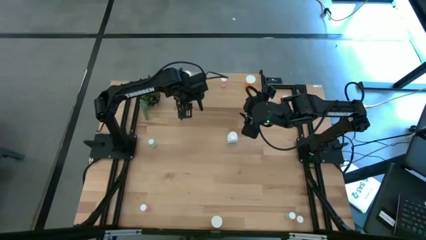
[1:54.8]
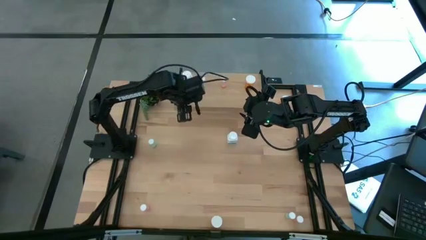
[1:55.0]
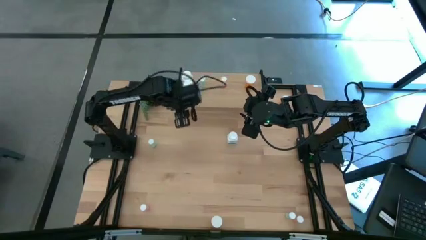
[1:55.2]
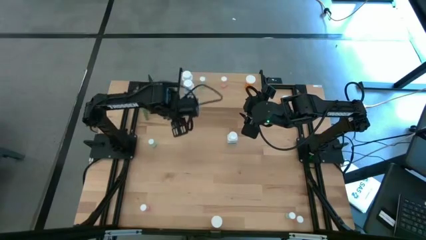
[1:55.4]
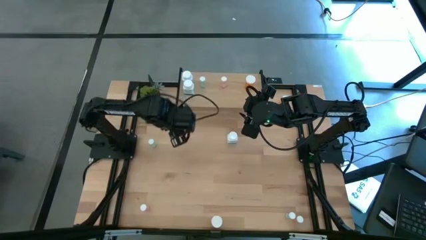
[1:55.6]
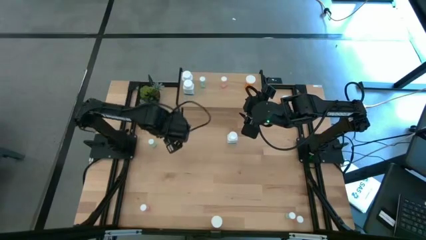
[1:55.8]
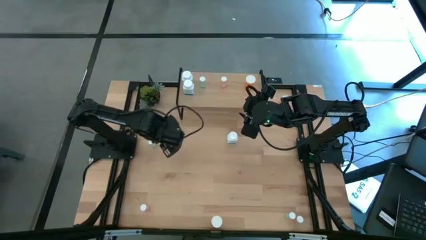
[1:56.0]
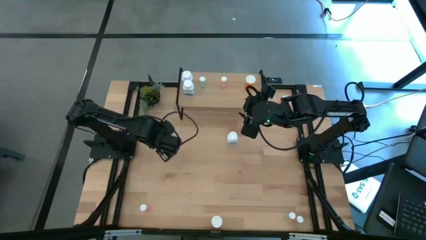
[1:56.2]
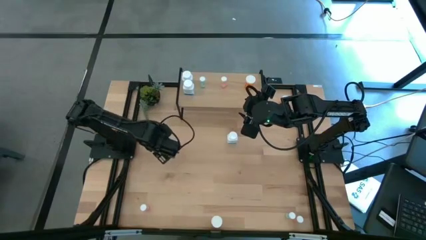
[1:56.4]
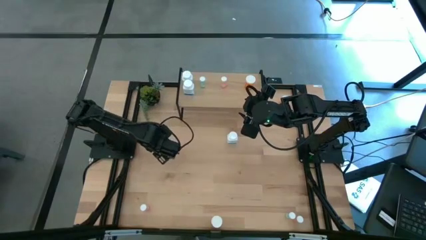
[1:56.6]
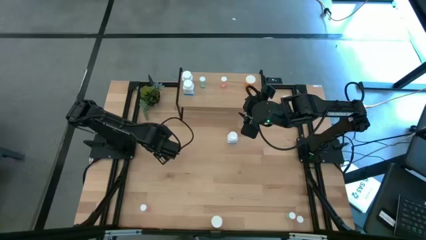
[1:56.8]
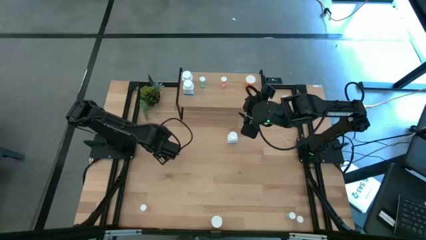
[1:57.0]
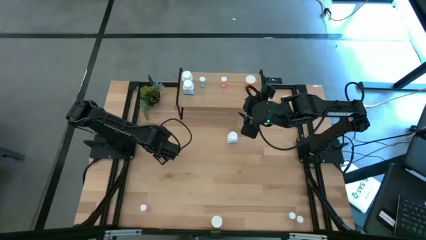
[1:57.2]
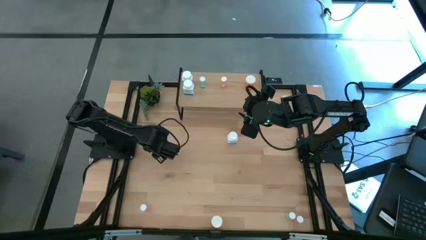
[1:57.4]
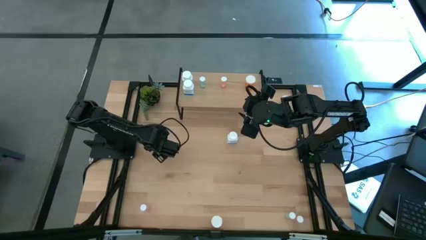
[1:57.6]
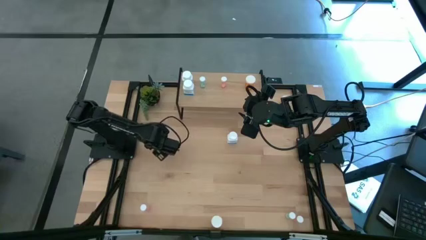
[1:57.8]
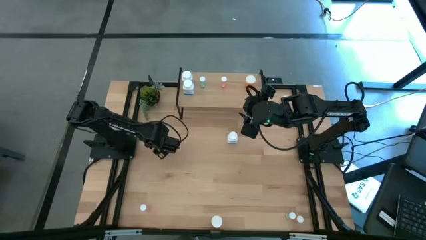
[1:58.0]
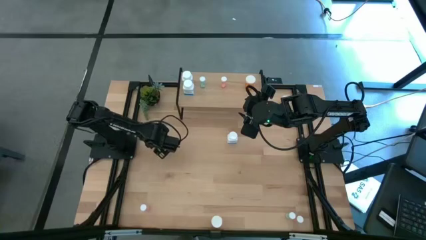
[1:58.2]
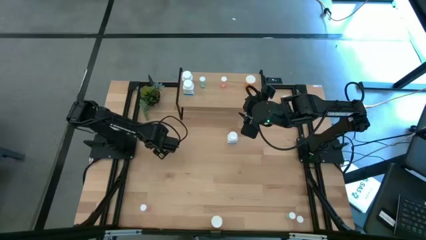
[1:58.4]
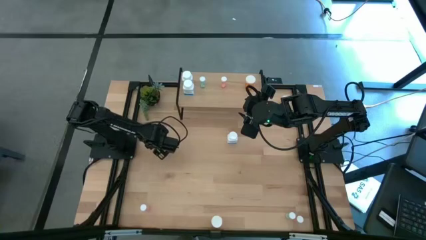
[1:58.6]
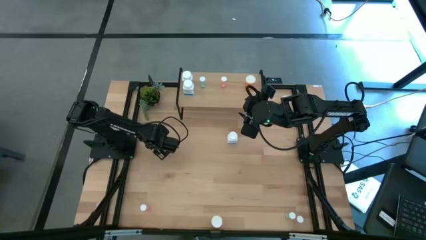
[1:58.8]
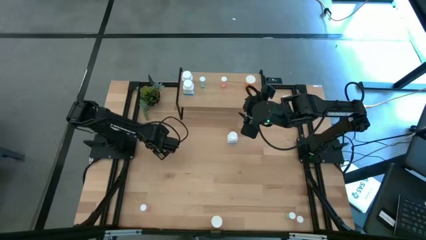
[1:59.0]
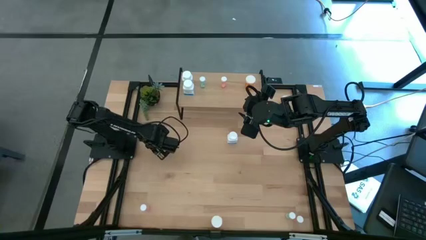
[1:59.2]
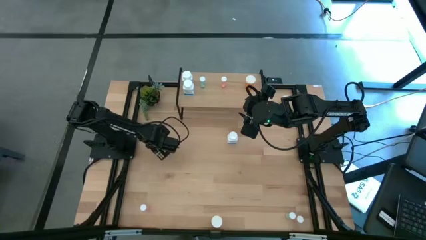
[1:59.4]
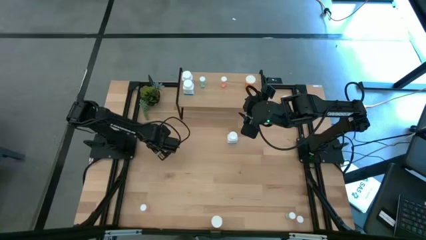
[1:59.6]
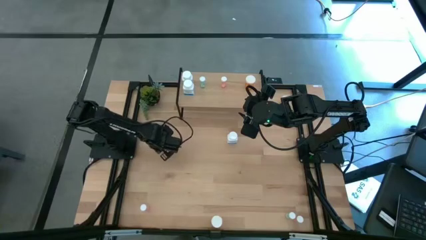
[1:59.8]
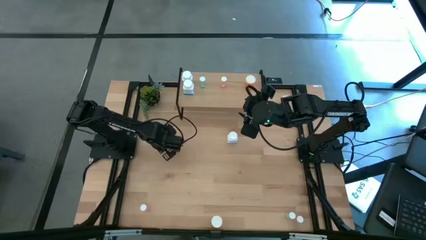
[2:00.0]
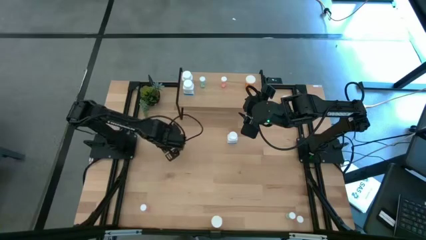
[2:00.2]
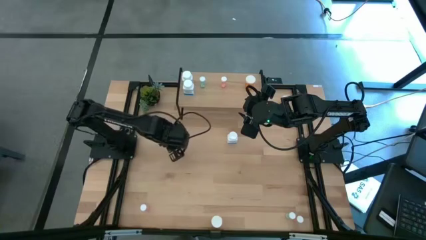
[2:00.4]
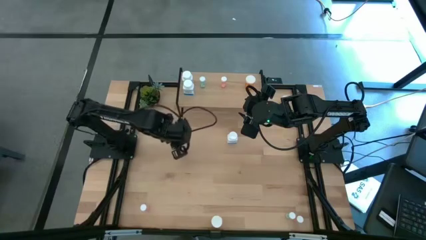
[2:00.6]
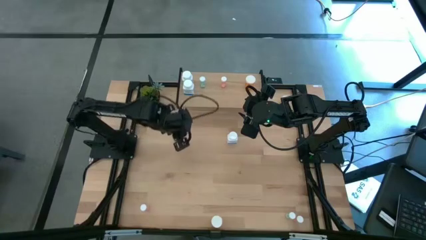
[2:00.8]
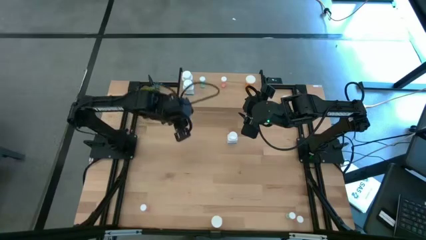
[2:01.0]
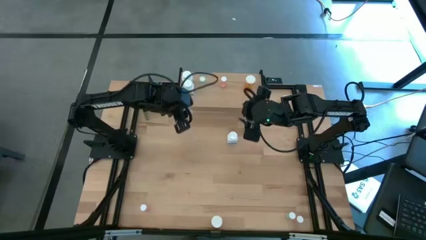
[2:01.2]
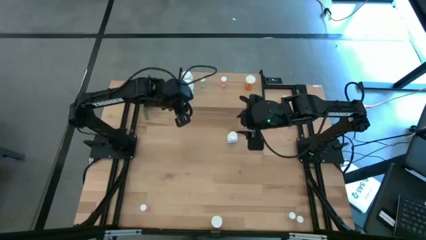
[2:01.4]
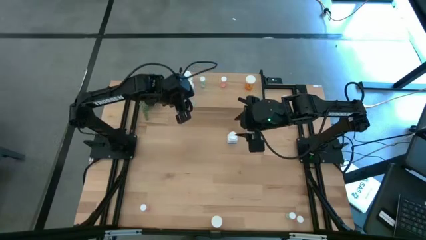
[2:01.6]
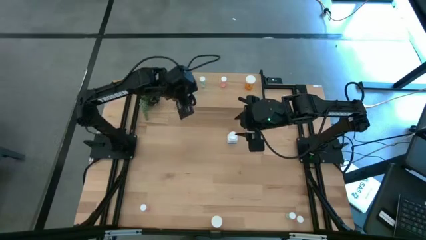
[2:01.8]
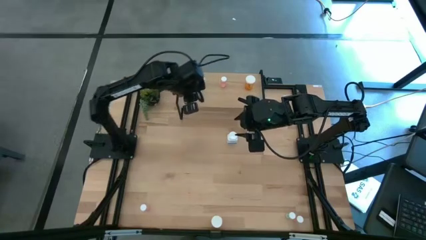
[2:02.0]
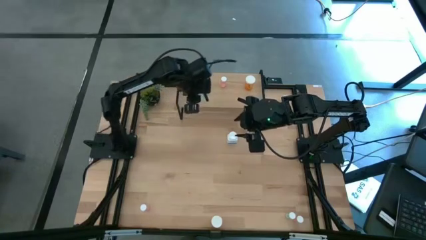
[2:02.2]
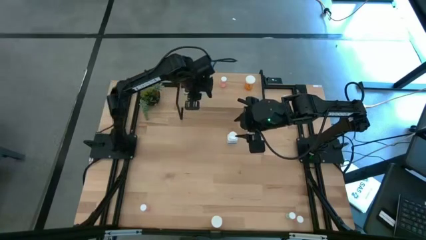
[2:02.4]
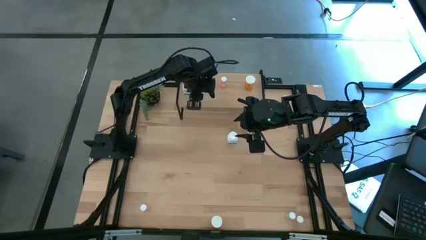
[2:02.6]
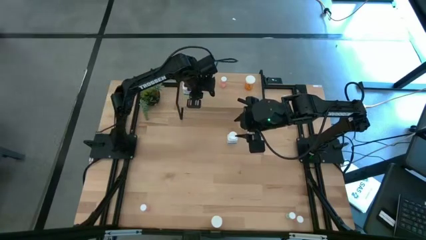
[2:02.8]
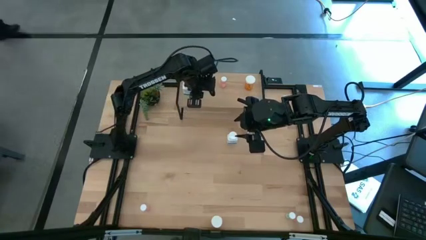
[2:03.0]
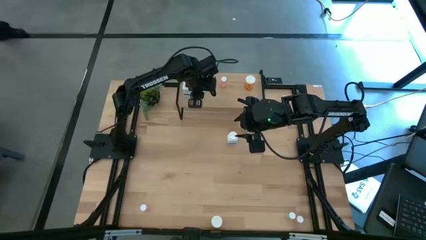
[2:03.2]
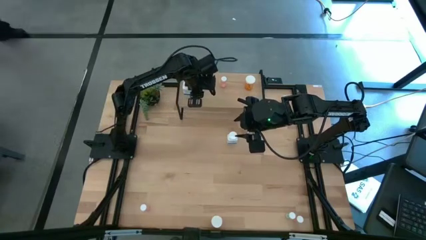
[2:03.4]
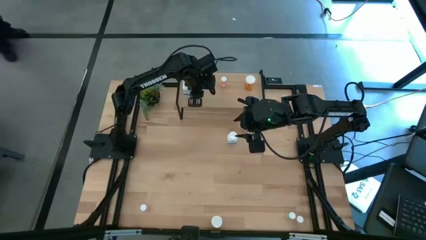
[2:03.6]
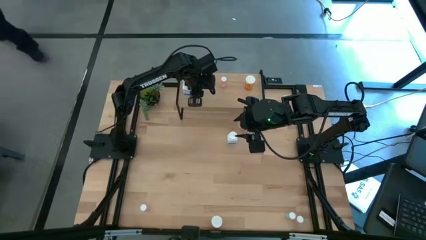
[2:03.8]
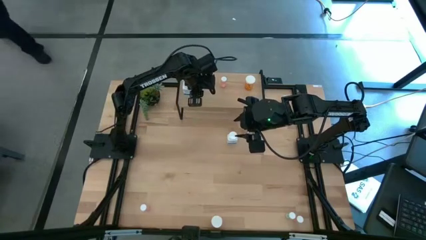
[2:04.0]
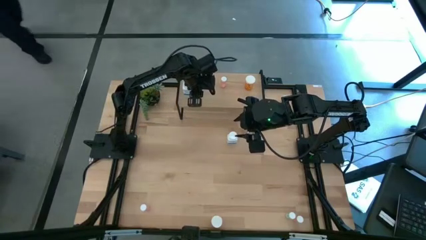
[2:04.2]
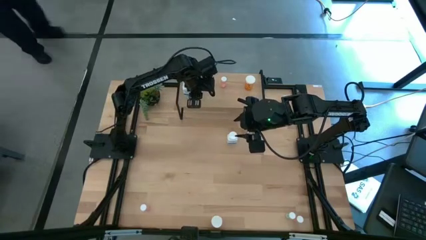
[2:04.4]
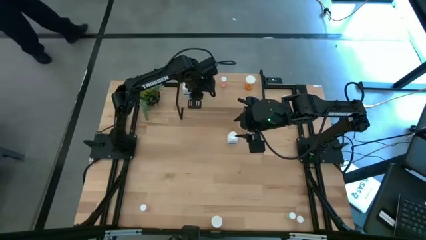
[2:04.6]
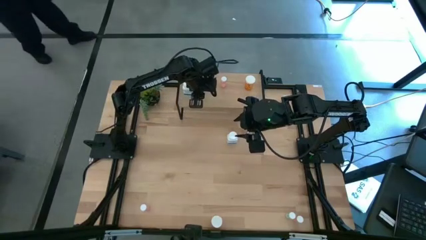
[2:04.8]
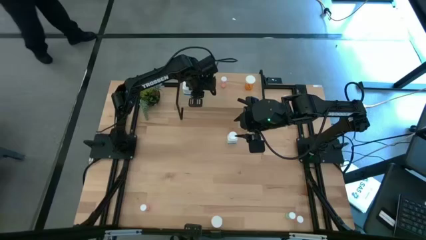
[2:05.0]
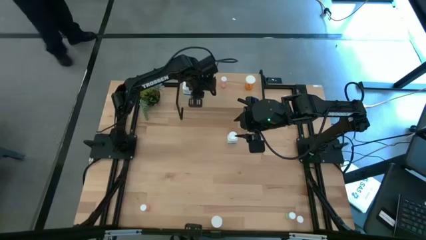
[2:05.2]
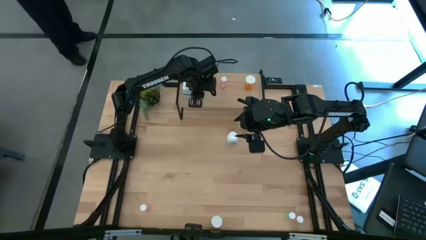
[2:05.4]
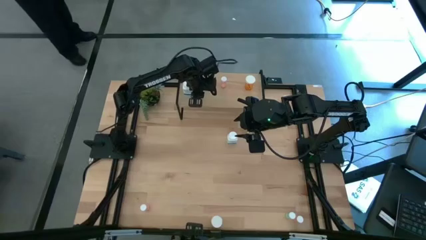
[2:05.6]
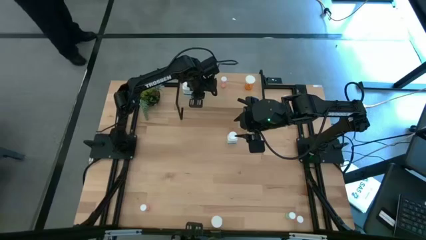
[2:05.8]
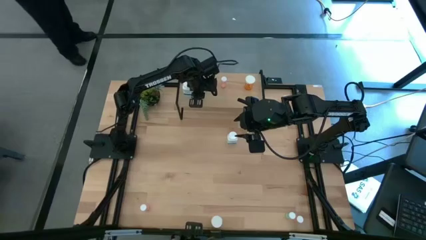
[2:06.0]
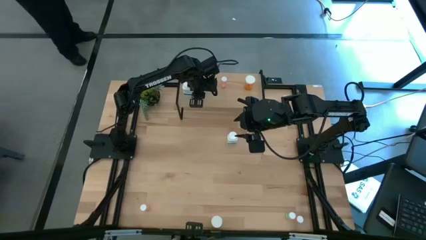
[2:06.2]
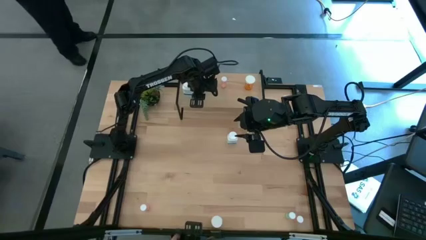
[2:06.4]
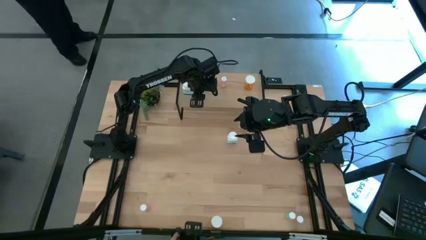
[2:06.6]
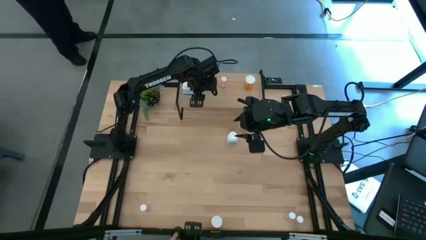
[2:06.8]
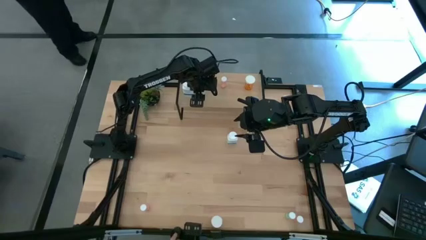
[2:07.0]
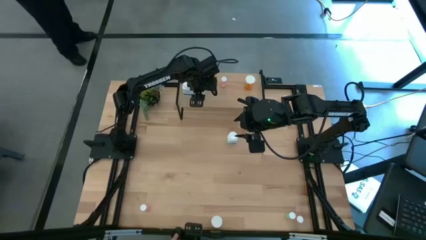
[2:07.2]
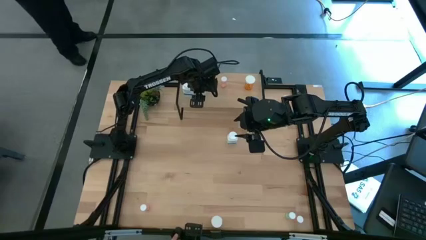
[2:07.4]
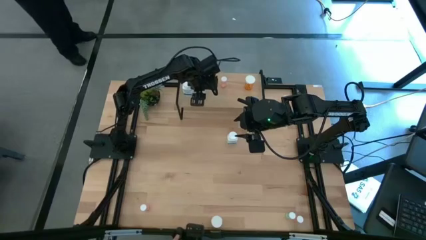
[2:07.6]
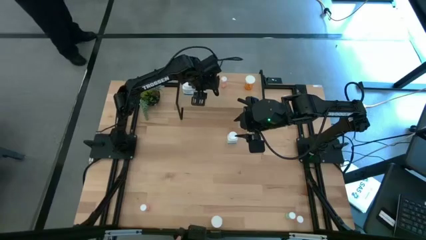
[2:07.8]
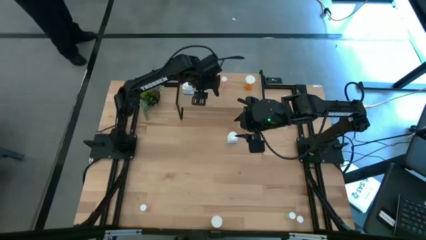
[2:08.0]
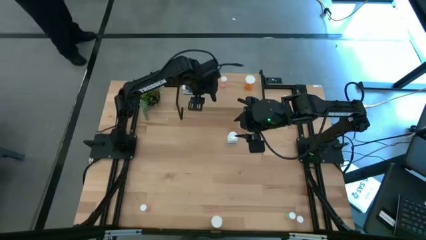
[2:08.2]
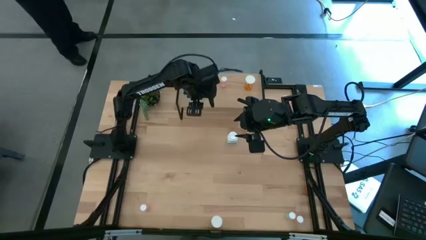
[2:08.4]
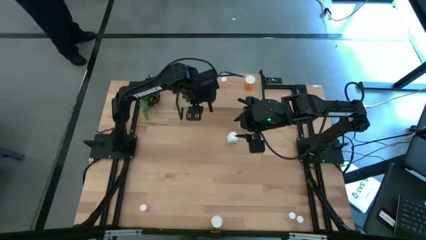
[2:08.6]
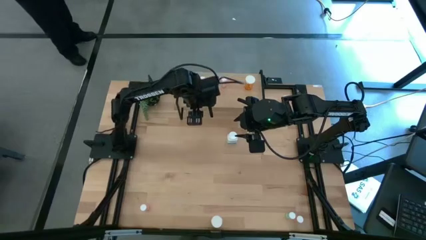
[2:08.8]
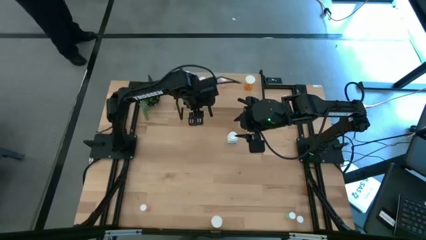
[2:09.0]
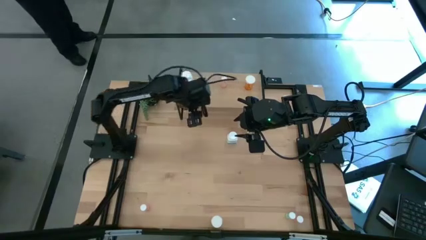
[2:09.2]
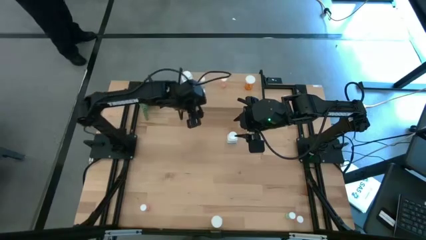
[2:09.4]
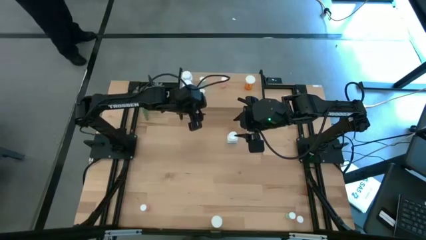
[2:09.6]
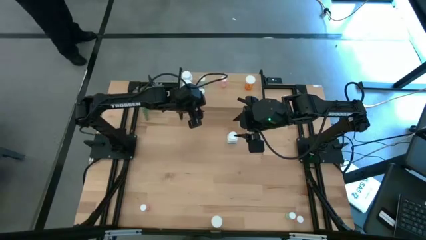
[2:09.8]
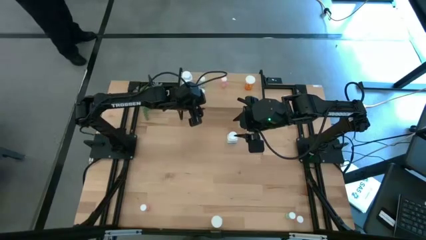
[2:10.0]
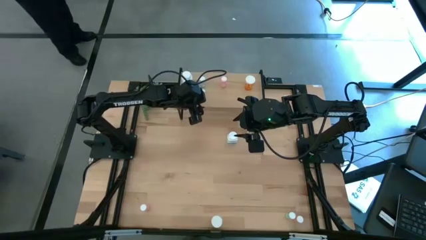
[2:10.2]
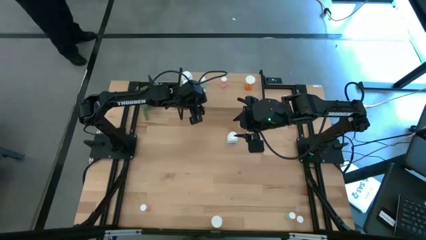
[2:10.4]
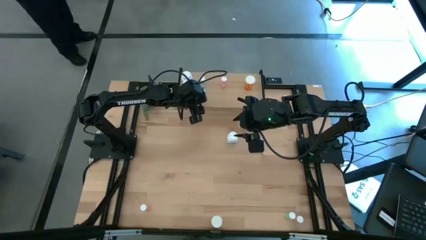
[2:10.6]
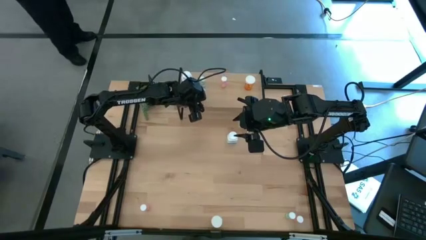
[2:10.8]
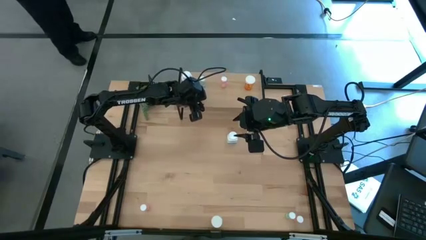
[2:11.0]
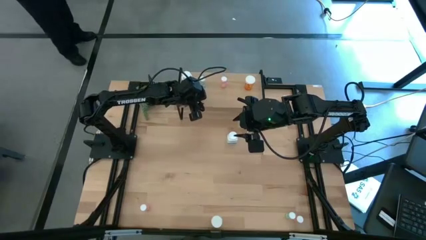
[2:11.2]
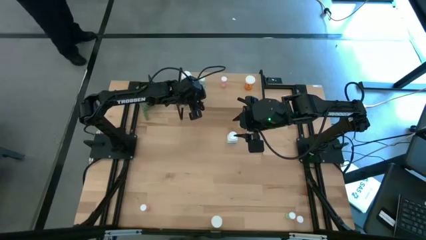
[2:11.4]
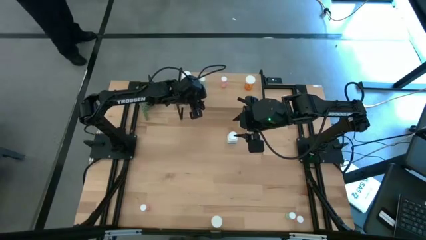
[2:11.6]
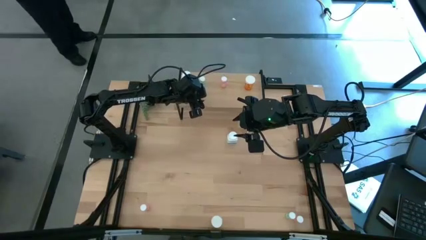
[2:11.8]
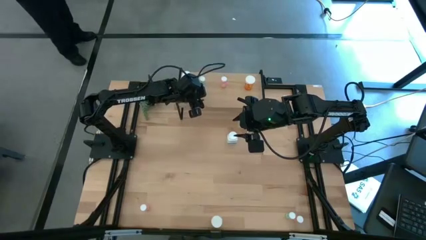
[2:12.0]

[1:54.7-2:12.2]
Task: Pick and place medicine bottles onto shelf by color
Put the top blue pill bottle on the shelf aligned with the other blue pill bottle
